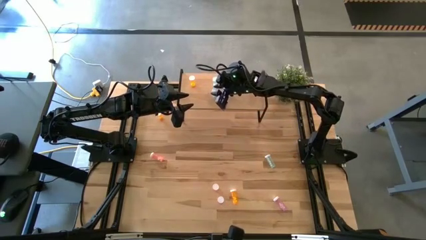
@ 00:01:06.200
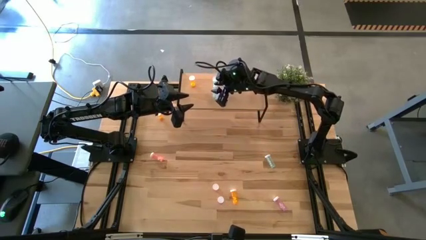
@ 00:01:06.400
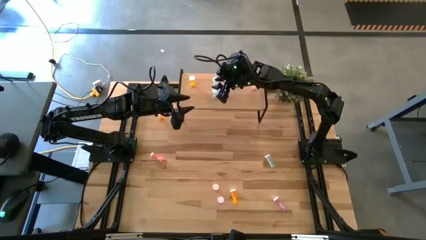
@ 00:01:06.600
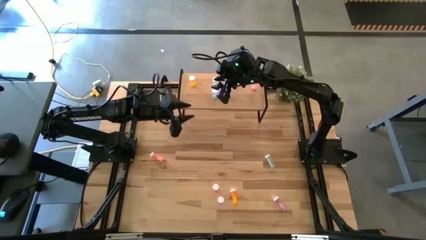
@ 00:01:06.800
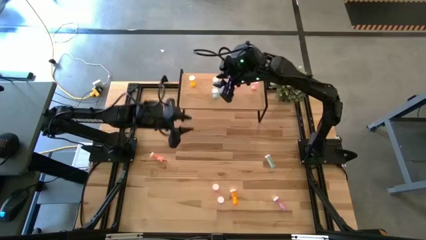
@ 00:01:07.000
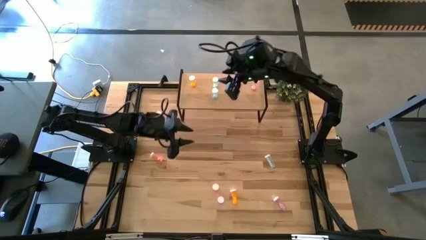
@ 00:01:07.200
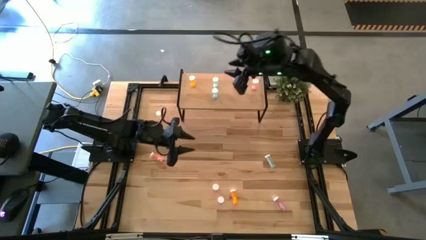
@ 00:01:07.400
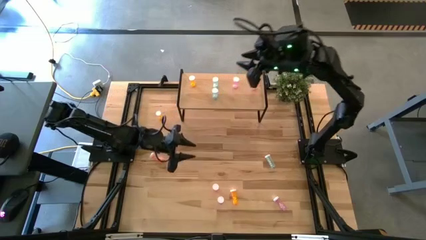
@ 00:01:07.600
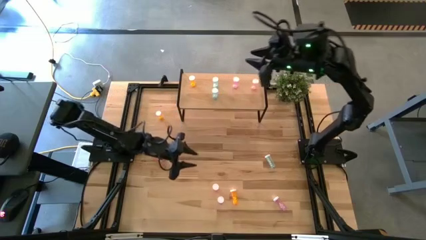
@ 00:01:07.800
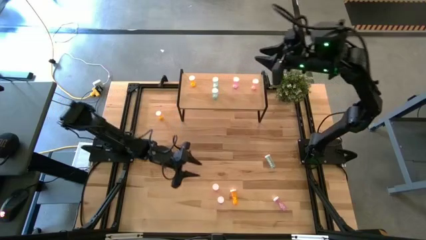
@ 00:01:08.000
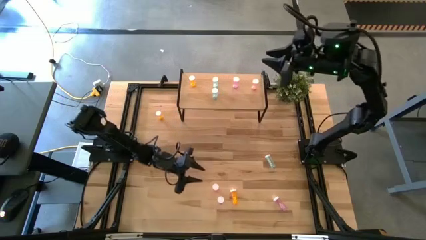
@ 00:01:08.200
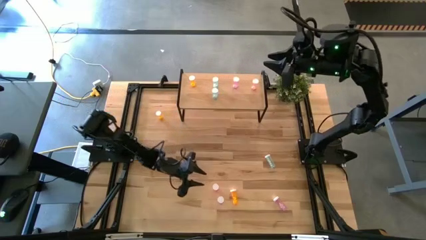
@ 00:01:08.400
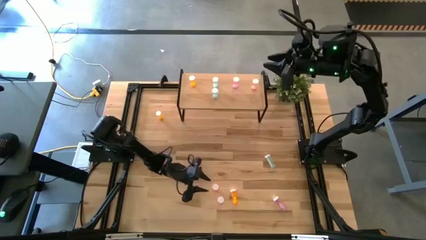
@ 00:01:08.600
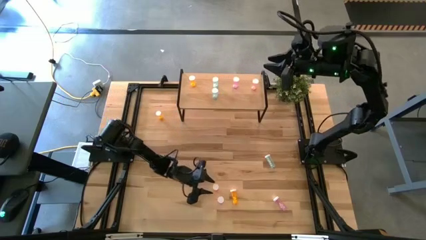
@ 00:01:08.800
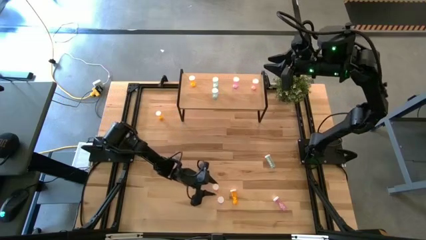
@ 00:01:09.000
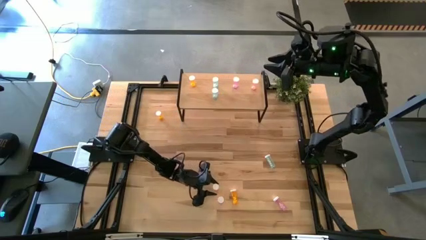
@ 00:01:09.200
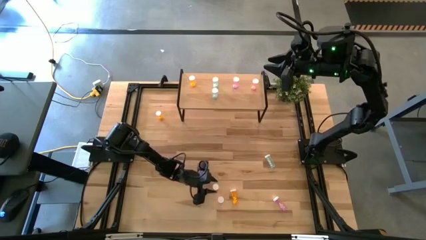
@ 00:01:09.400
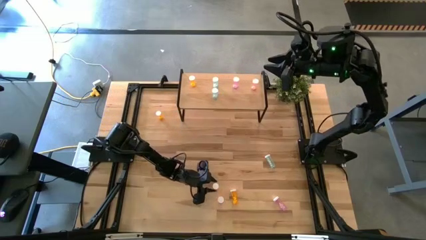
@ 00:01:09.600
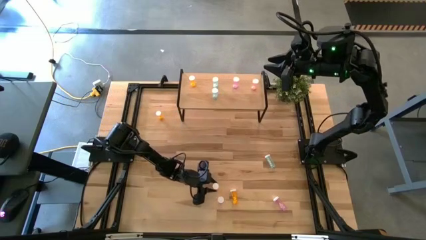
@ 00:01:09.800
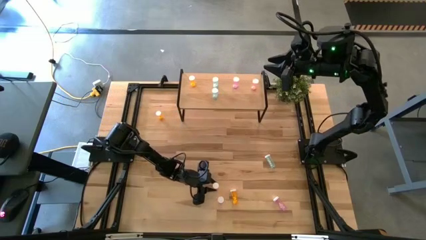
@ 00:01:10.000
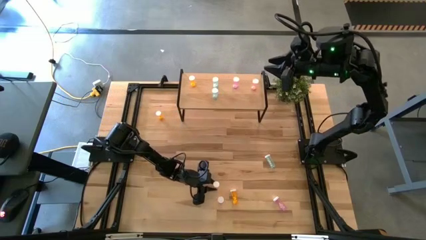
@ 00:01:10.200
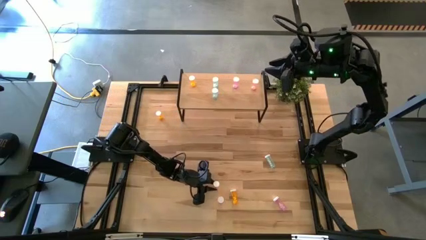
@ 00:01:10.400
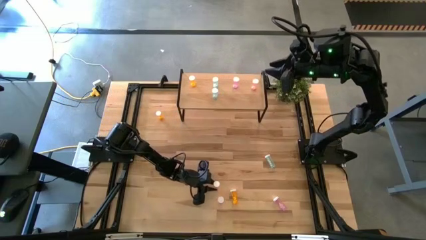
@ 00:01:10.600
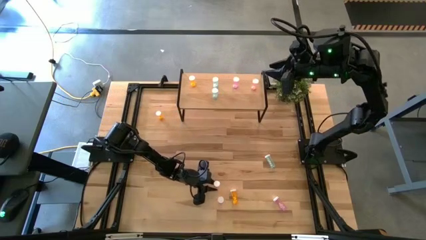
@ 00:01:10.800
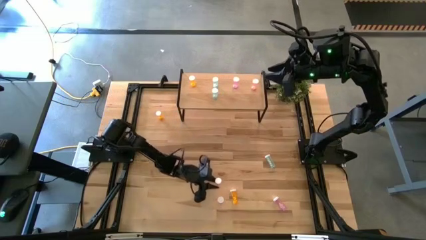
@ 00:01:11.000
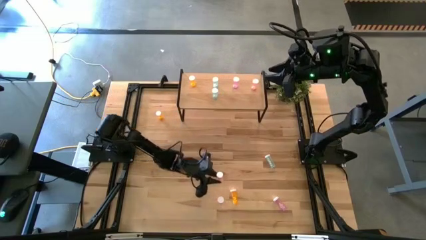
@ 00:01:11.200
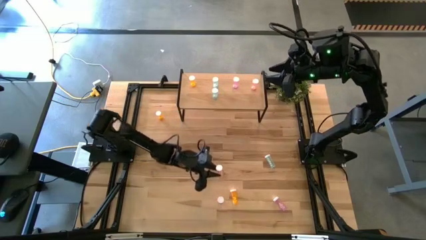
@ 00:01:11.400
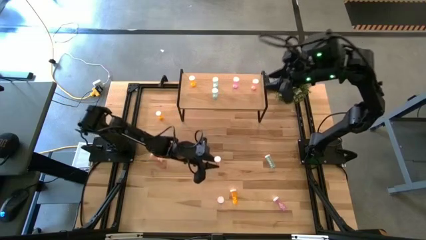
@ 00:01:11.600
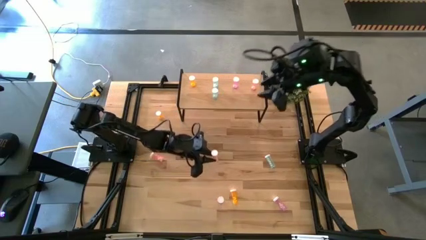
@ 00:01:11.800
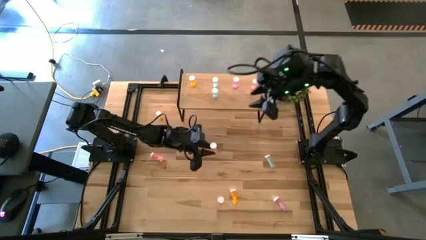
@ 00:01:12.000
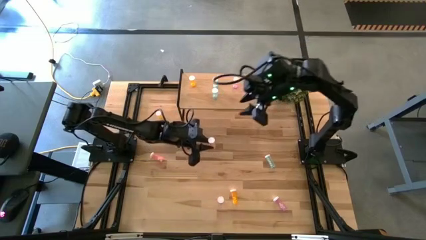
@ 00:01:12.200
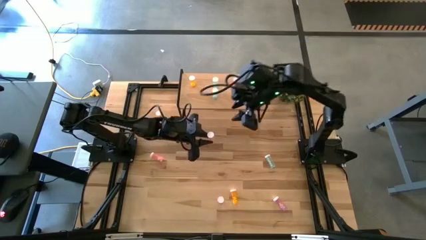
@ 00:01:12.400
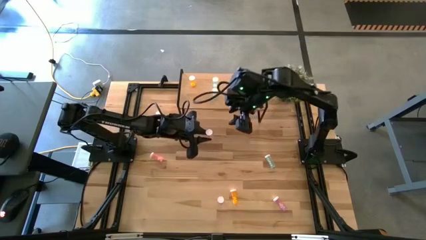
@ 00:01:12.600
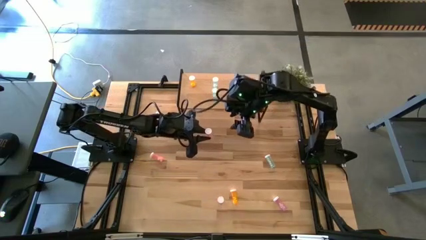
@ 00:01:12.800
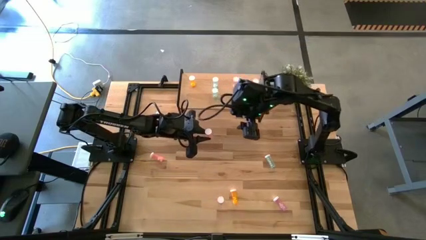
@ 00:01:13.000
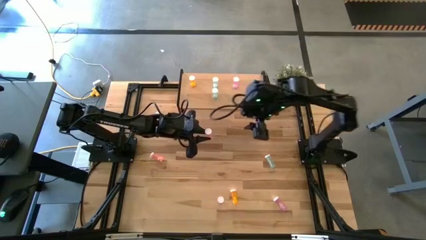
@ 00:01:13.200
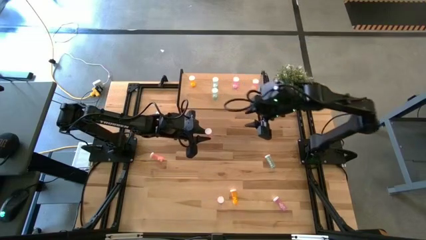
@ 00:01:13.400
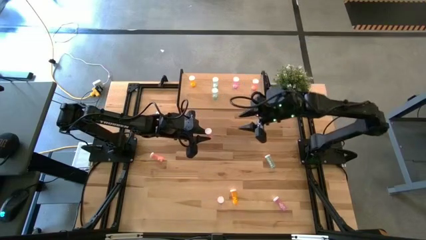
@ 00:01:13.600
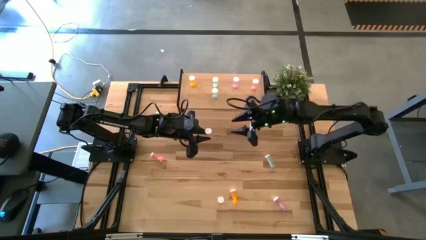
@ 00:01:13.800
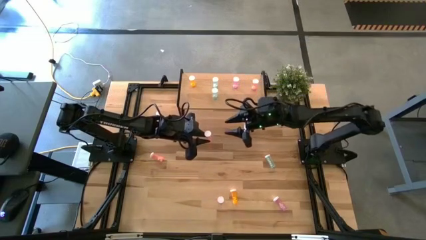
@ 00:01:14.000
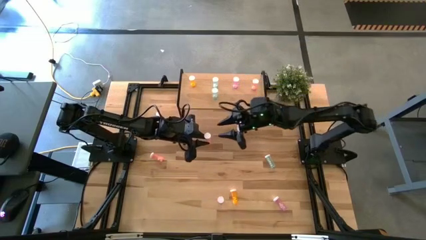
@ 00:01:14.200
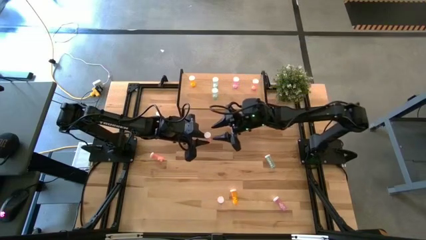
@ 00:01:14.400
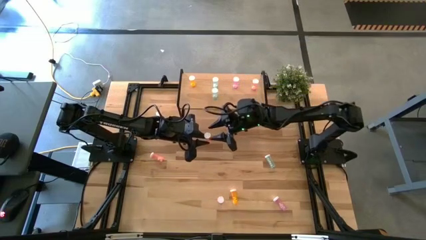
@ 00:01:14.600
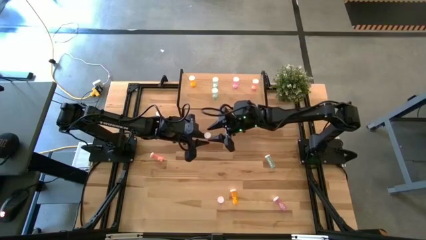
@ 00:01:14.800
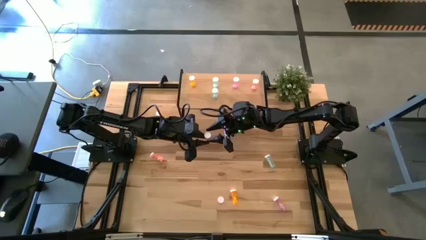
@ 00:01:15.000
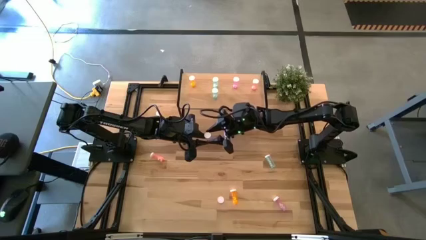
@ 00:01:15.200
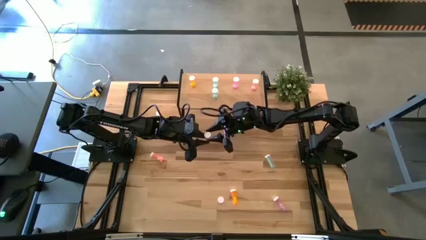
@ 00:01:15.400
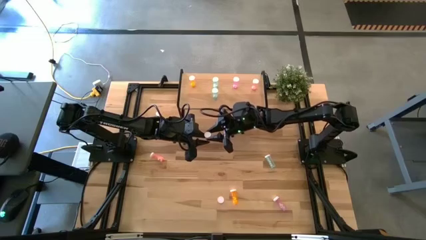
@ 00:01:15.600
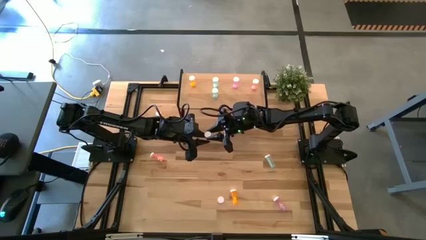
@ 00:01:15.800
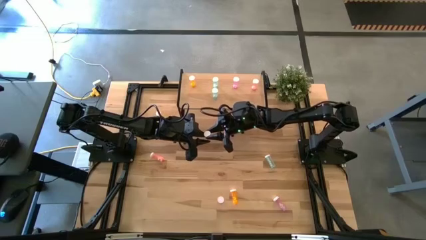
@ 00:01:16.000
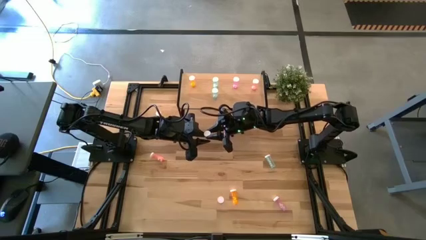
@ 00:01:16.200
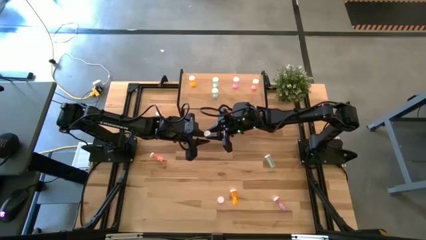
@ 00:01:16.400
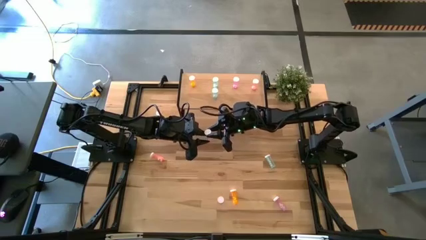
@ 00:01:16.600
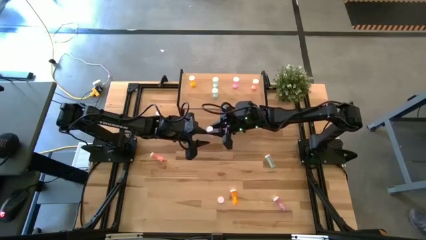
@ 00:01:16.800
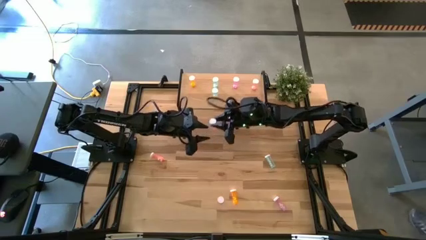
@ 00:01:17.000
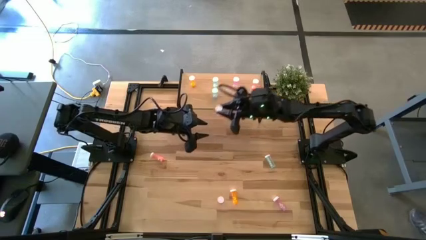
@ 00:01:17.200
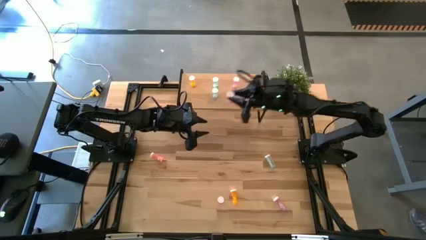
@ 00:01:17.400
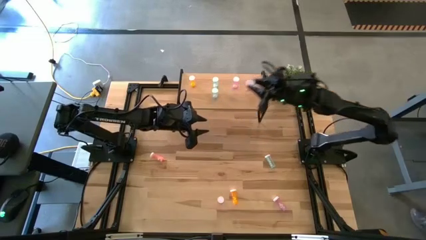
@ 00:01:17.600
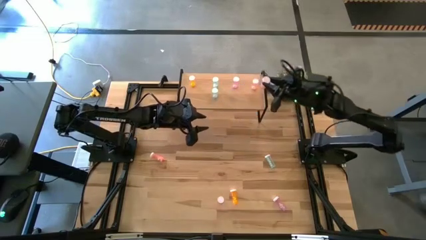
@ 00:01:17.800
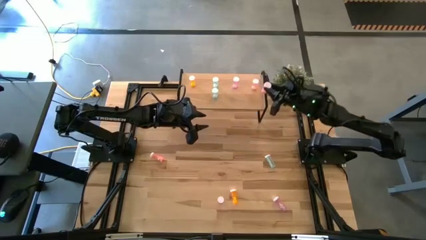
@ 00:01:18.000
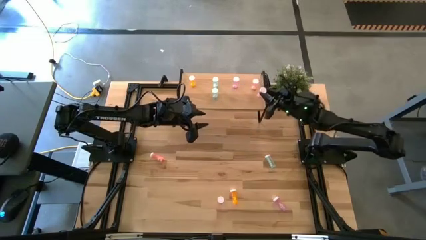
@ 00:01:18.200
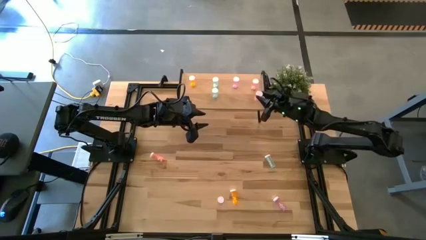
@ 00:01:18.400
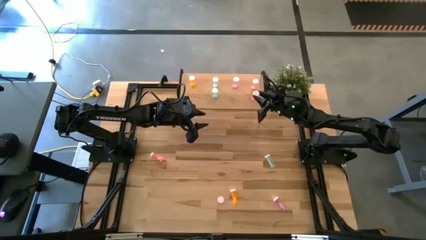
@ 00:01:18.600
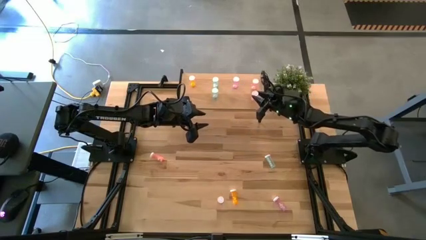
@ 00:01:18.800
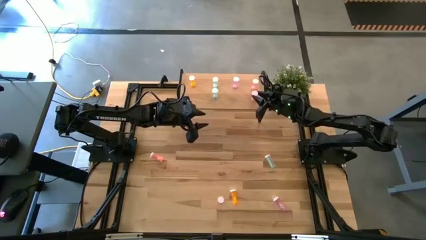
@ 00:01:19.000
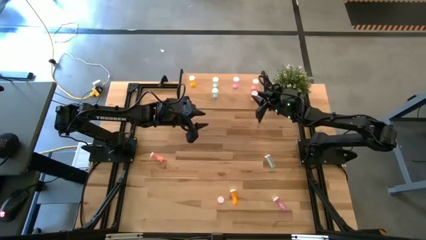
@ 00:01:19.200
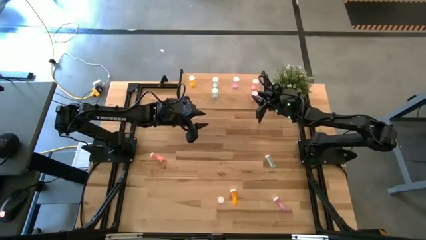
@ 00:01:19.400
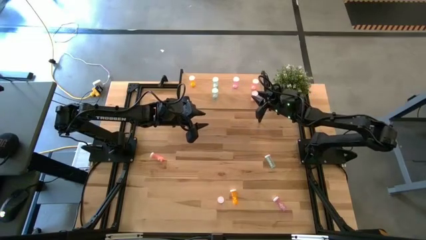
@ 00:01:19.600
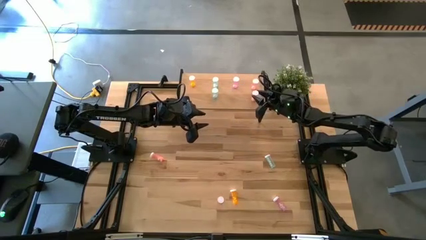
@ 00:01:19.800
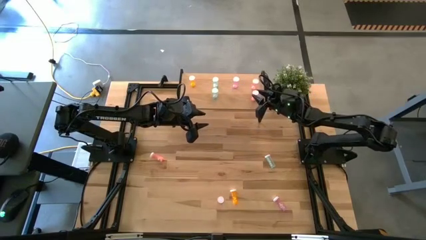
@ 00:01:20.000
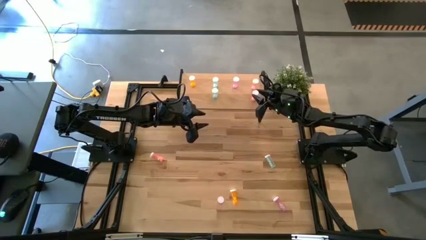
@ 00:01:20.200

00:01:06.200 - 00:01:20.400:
Task: Pick and place medicine bottles onto shelf by color
Put the right pink pill bottle aligned with the other pink pill bottle
